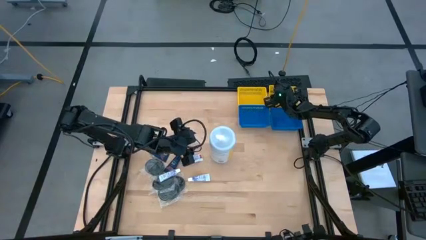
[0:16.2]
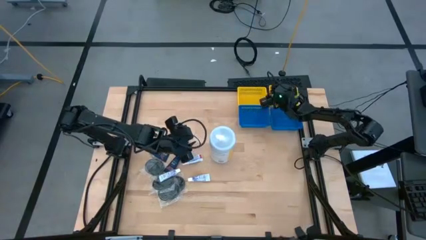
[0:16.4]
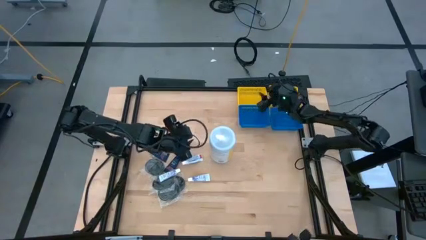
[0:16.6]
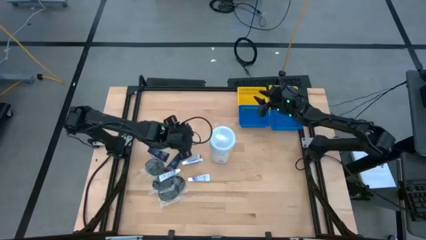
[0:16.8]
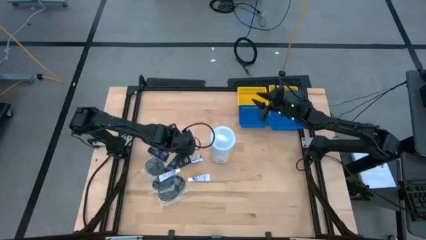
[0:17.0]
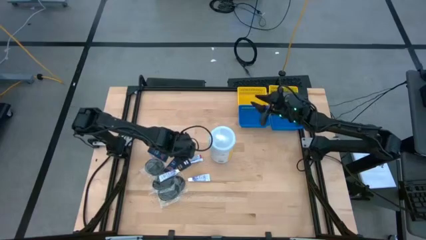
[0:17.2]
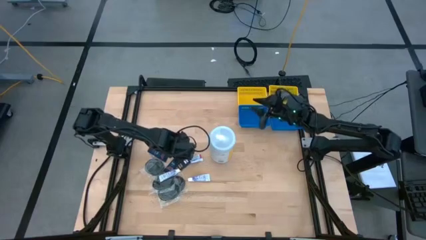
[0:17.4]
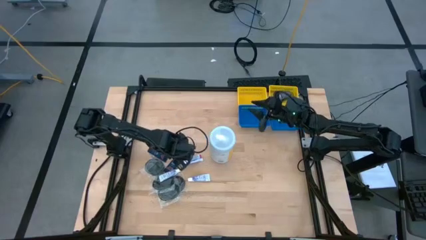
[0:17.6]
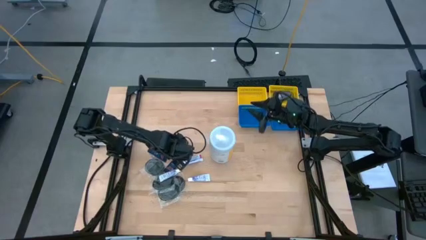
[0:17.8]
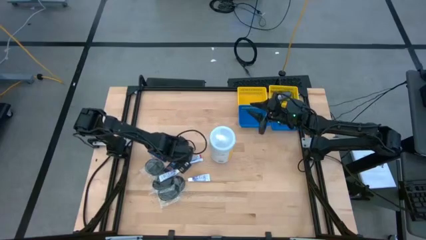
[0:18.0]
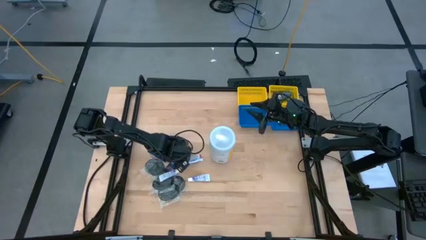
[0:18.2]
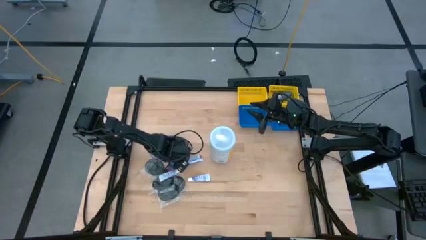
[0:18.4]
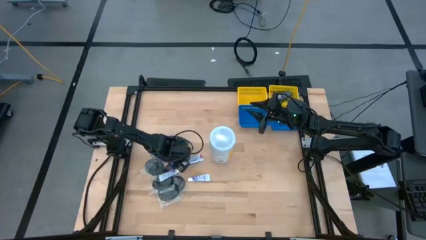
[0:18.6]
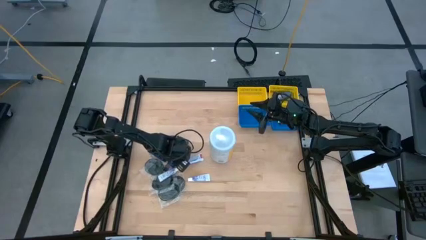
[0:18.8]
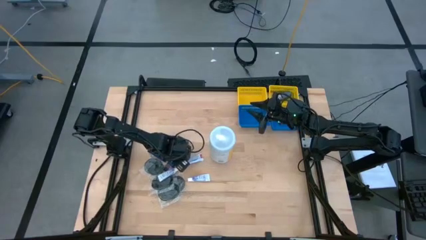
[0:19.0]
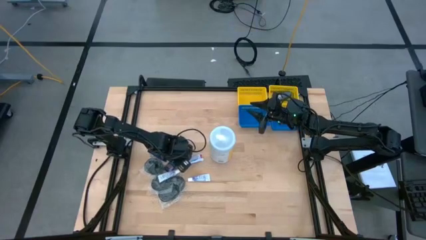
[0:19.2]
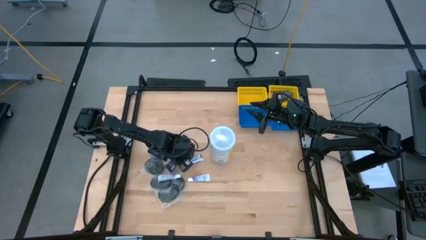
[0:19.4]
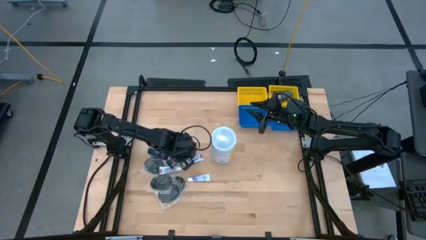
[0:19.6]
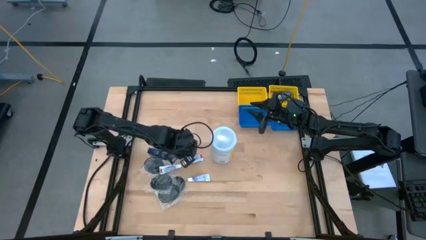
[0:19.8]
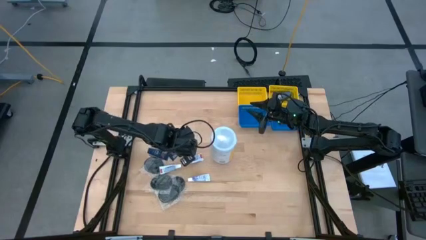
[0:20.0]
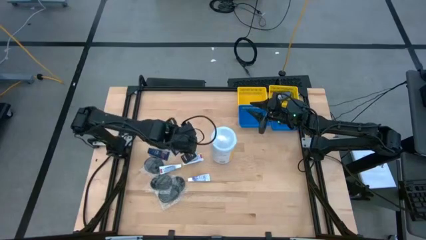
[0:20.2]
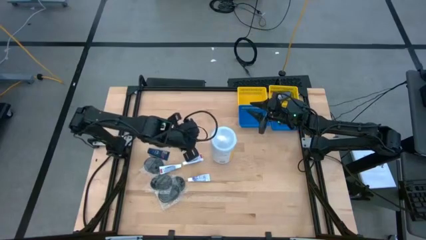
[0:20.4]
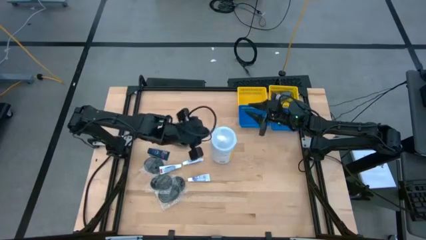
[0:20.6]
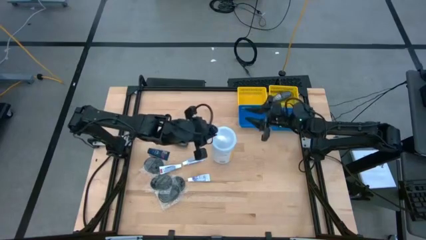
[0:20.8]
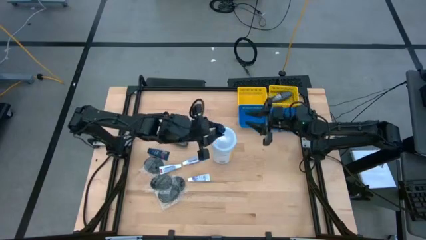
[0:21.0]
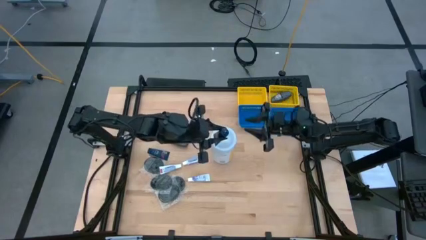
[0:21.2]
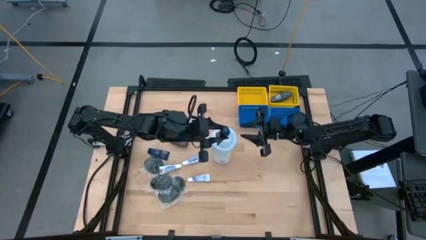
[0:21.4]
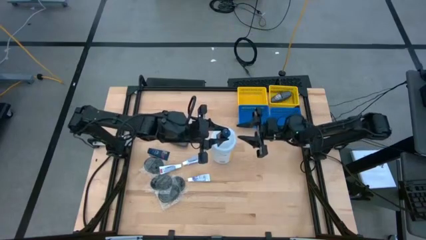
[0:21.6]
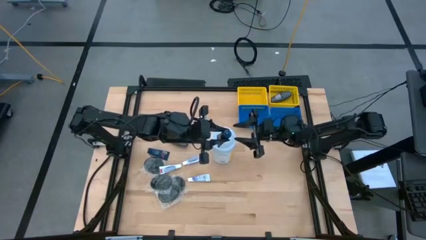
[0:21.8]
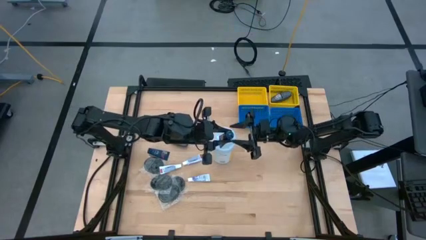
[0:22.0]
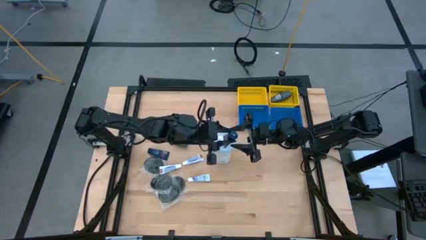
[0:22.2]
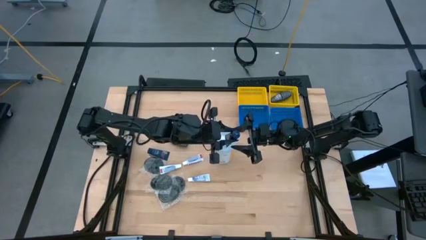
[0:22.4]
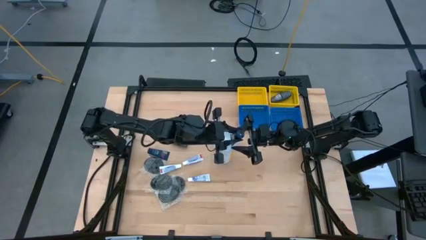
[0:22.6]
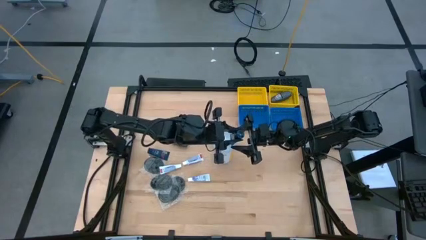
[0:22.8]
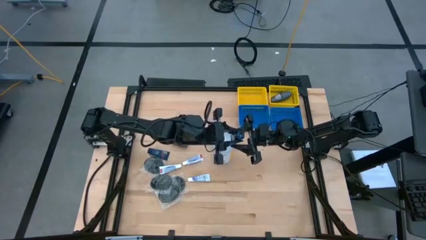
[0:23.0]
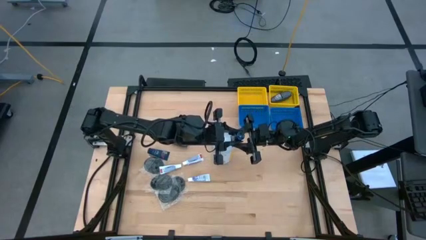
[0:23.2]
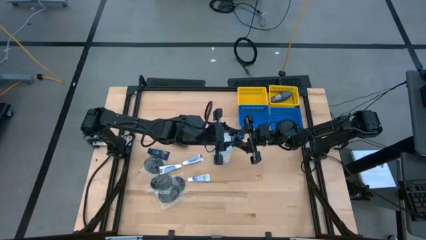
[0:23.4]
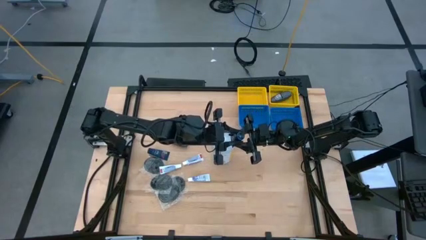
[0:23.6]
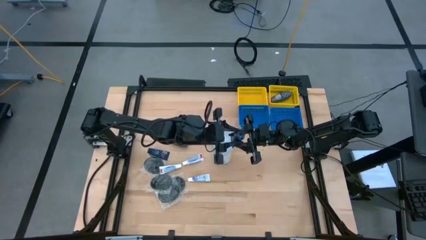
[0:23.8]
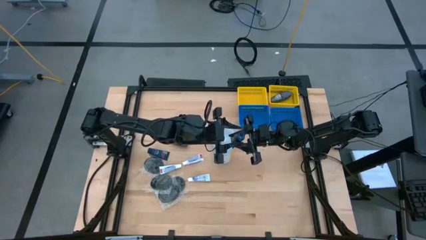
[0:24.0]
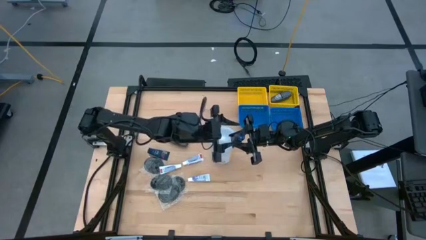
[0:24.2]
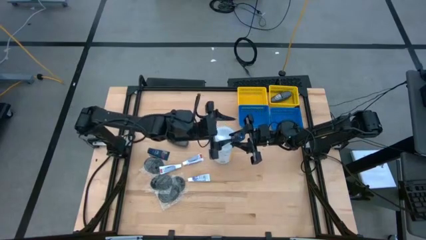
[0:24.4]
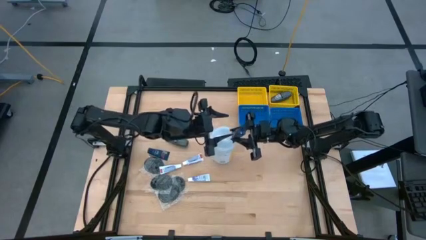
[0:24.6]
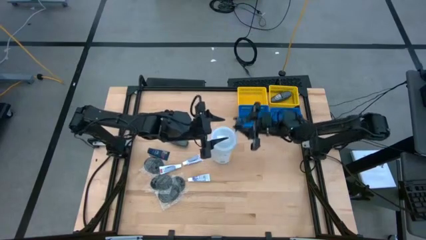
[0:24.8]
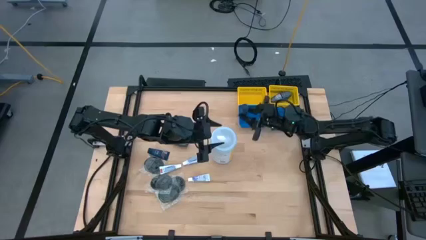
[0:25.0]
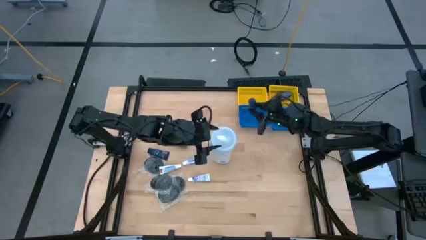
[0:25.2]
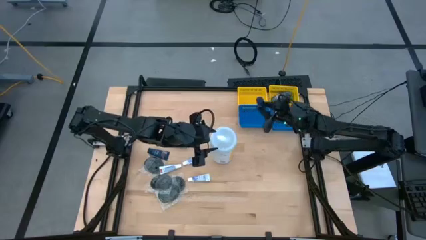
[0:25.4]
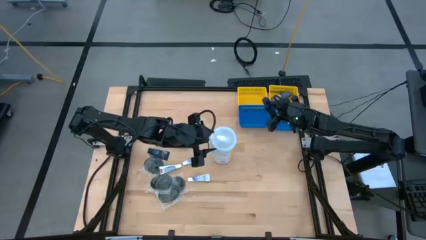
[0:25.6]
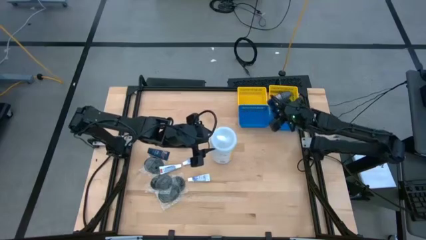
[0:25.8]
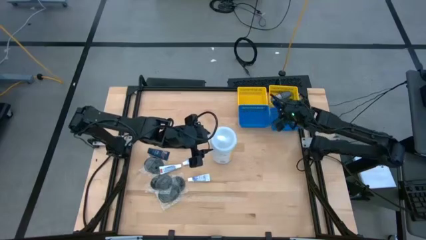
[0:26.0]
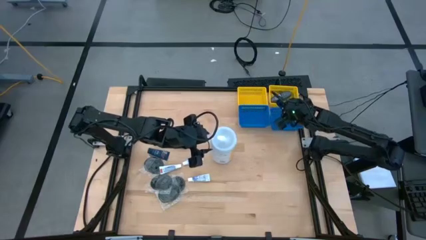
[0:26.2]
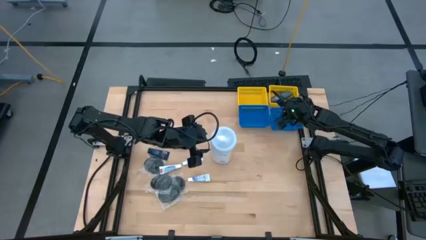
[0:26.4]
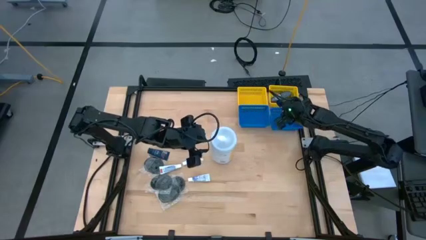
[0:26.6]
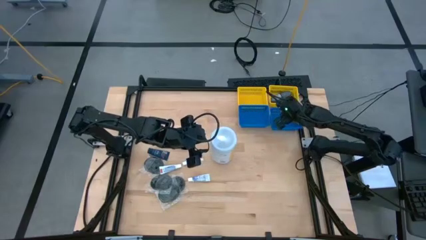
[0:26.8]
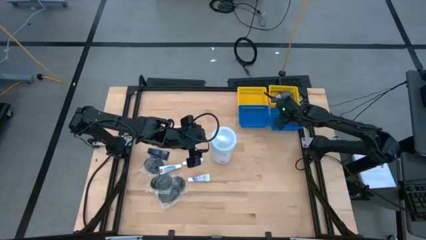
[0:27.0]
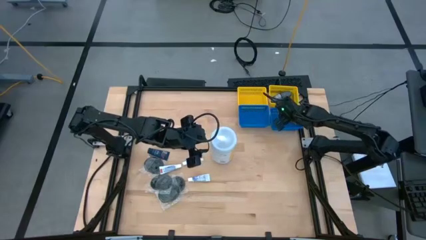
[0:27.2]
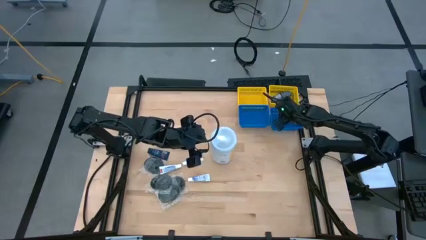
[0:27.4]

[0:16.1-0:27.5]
Task: Pick & Place Travel size toiletries
Put the blue shave cream into the right blue bin

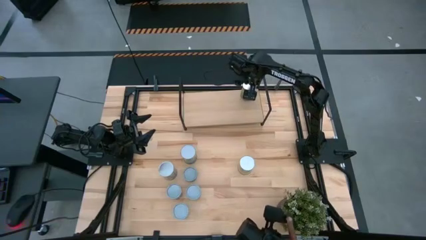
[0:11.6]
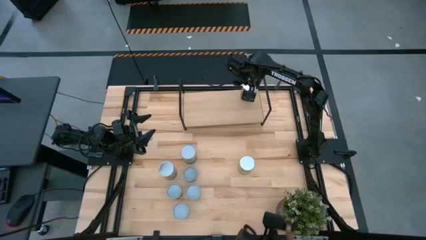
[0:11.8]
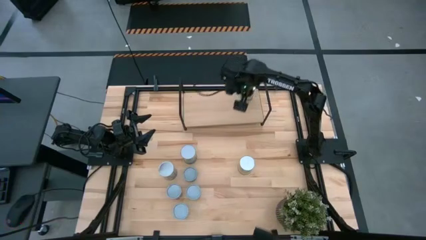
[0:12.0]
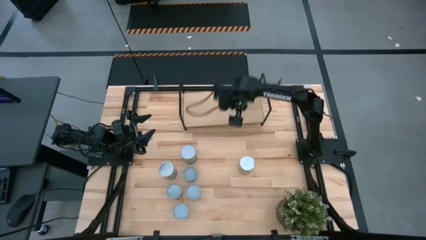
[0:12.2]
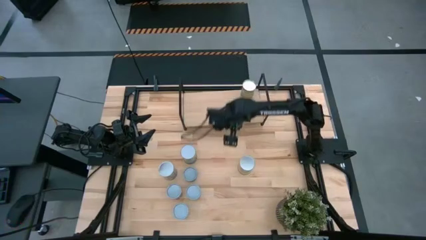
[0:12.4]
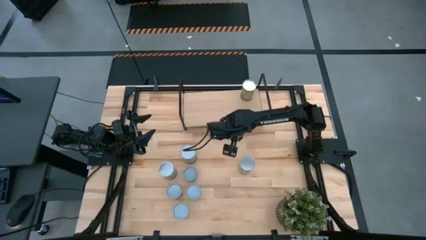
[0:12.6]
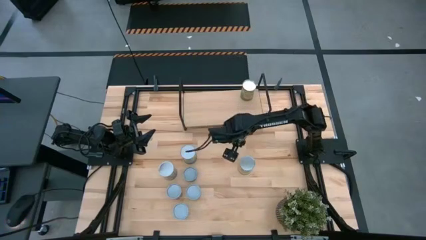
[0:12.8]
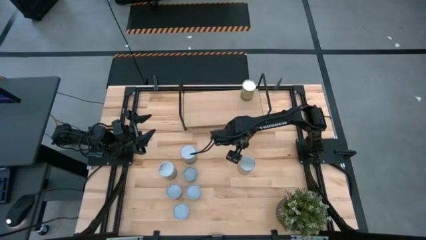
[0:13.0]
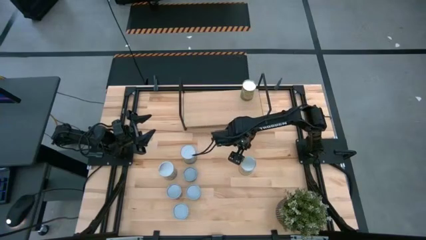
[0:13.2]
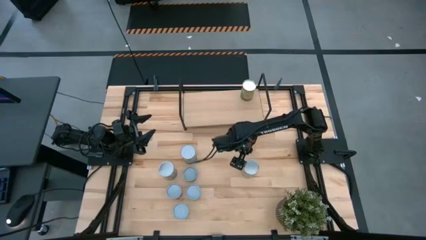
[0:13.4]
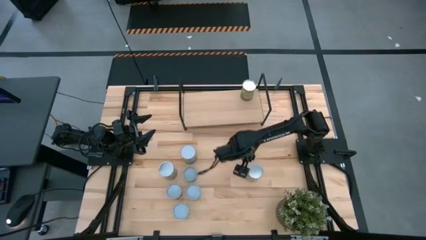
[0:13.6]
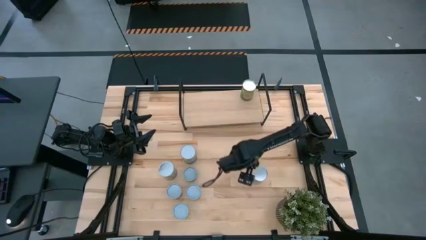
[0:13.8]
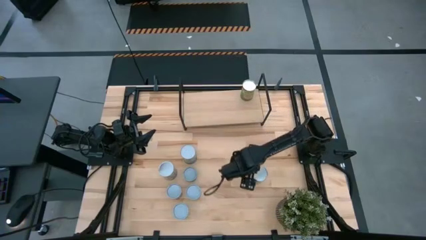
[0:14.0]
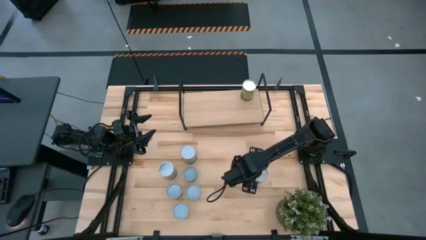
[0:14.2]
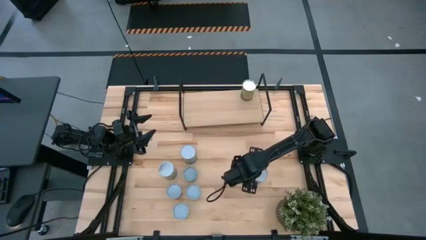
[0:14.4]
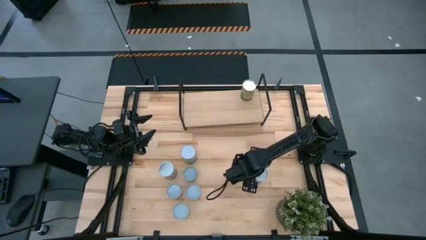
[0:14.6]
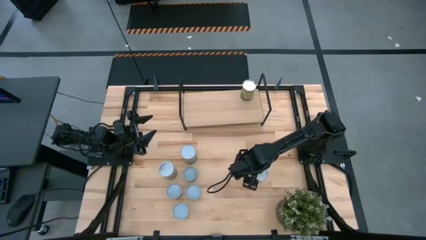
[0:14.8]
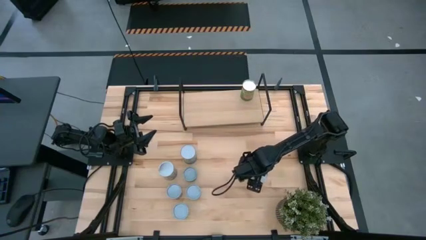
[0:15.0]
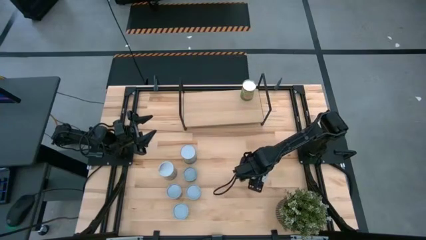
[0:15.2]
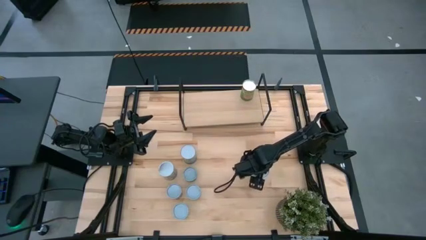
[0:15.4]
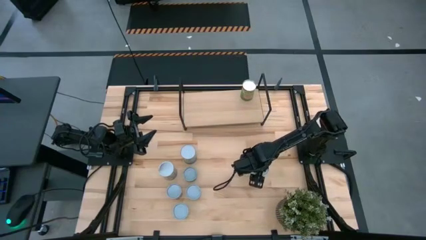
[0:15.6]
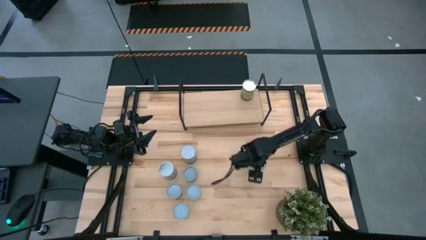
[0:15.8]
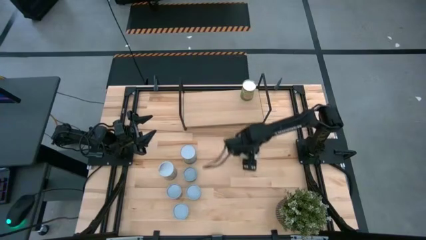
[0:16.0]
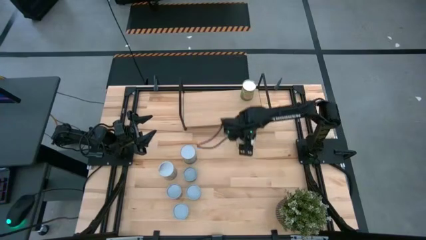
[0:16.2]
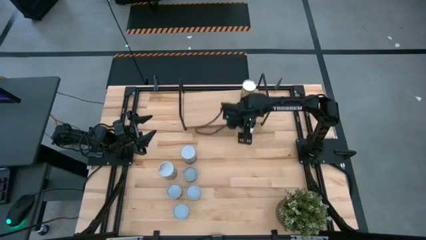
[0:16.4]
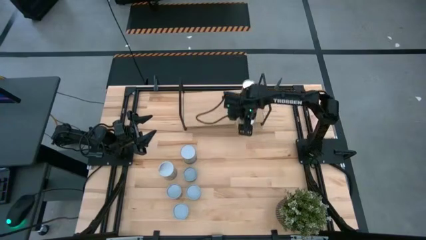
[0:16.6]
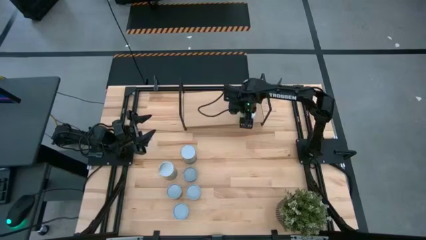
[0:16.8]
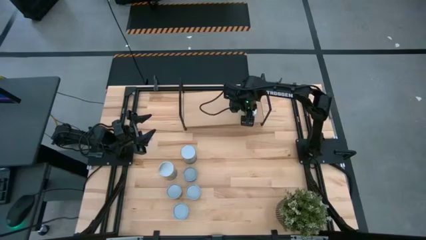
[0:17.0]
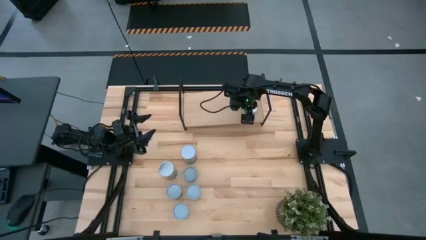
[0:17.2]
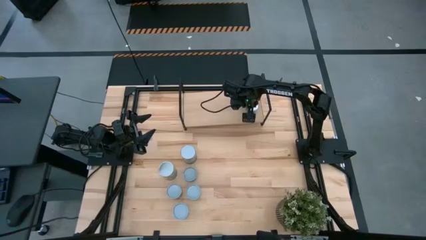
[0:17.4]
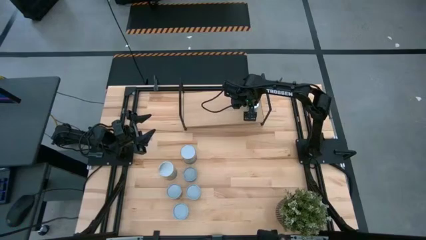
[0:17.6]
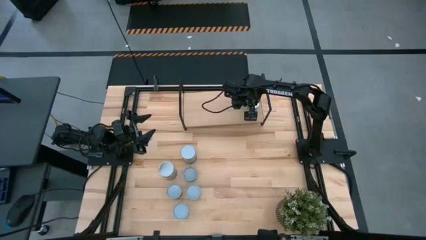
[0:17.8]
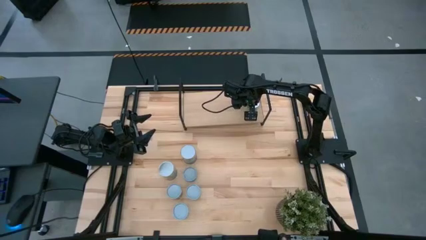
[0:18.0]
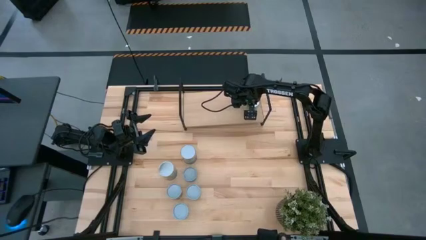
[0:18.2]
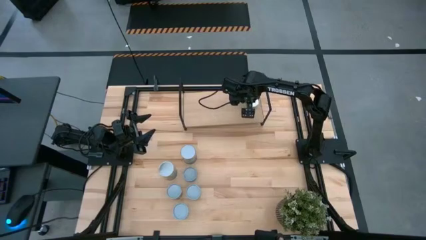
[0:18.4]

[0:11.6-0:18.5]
Task: Pick and place cans onto a shelf
Put the canned carrots on the shelf
